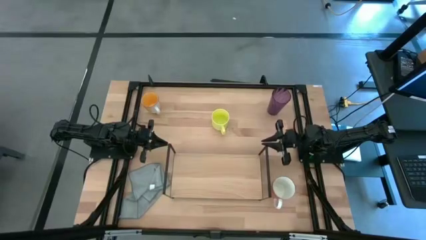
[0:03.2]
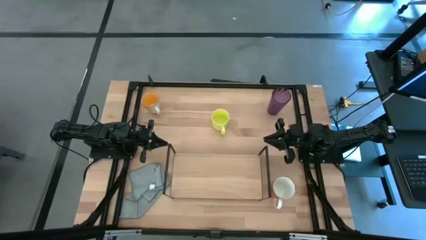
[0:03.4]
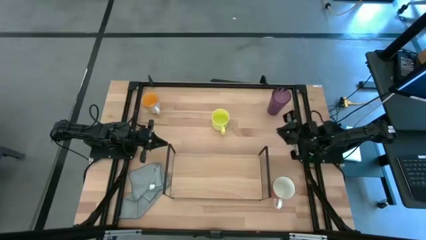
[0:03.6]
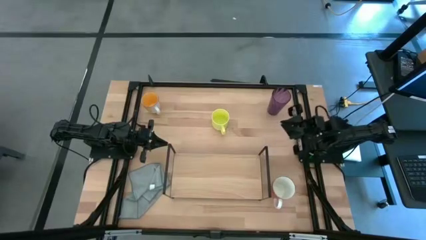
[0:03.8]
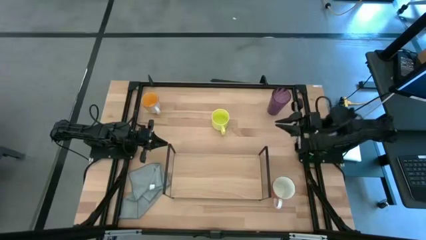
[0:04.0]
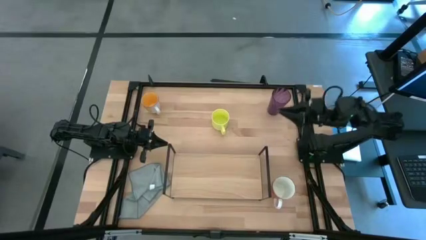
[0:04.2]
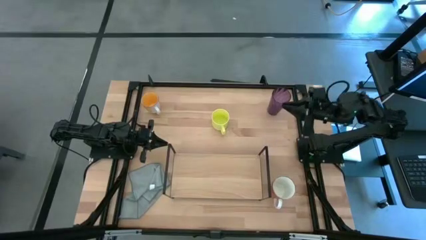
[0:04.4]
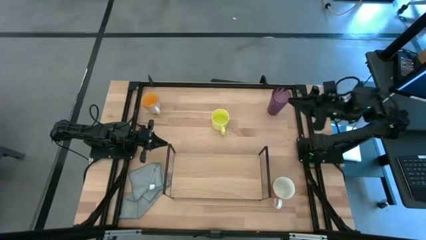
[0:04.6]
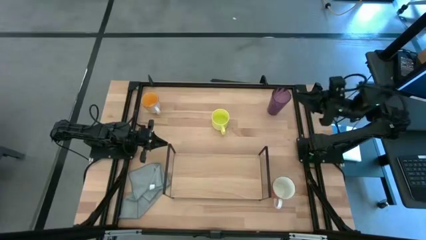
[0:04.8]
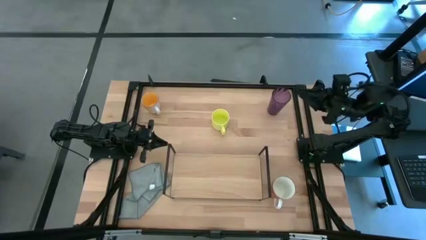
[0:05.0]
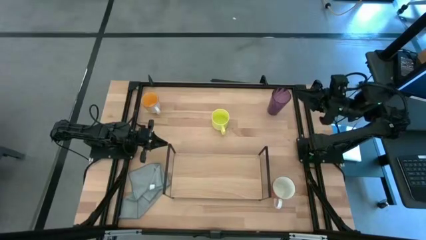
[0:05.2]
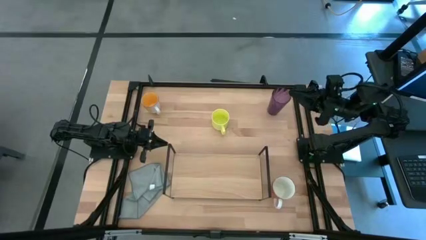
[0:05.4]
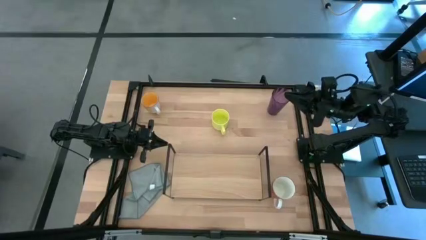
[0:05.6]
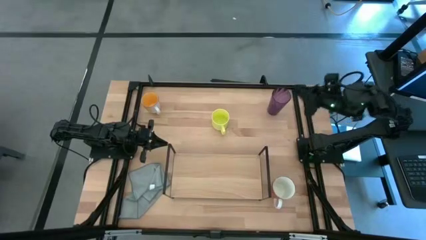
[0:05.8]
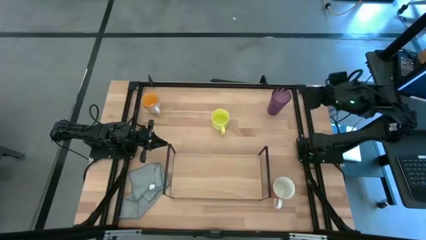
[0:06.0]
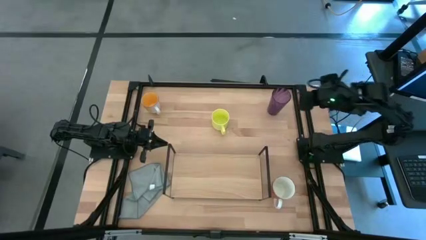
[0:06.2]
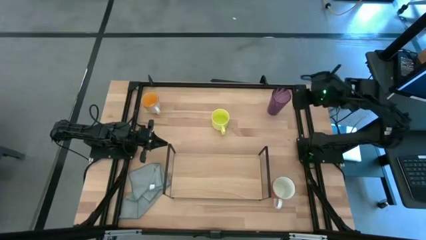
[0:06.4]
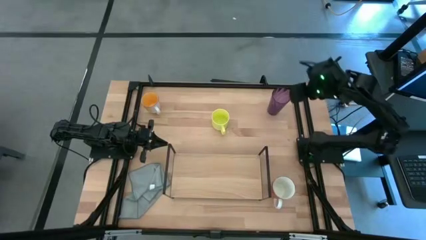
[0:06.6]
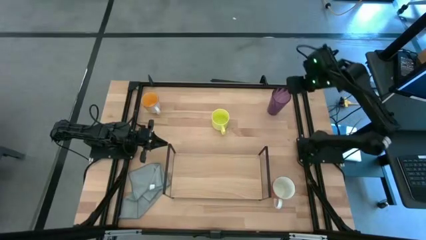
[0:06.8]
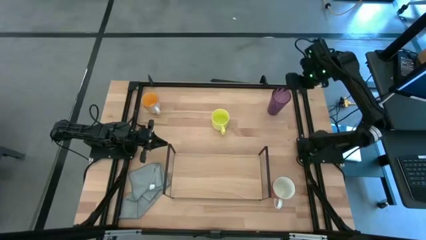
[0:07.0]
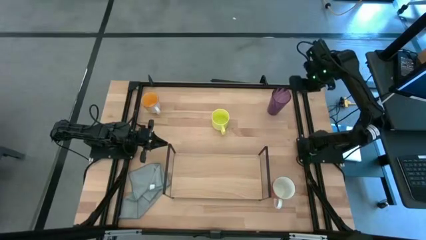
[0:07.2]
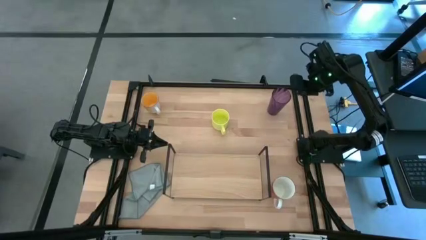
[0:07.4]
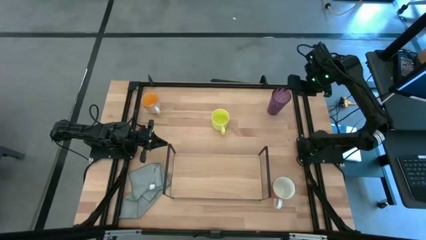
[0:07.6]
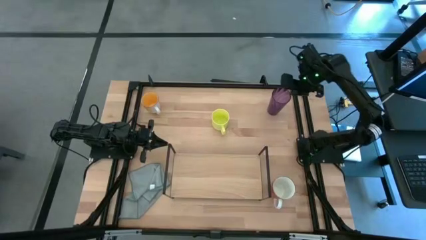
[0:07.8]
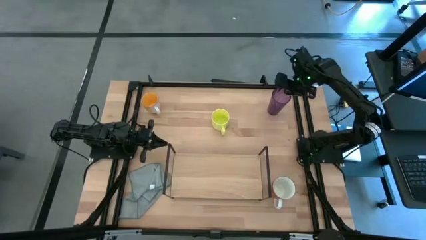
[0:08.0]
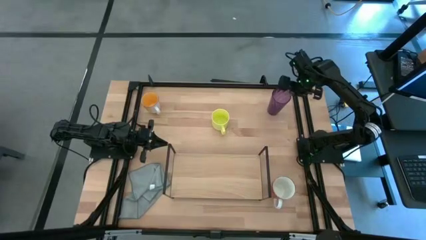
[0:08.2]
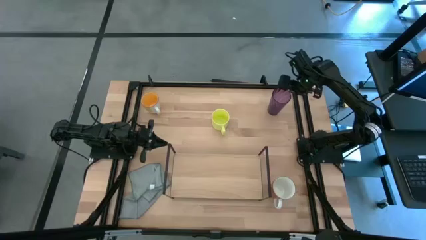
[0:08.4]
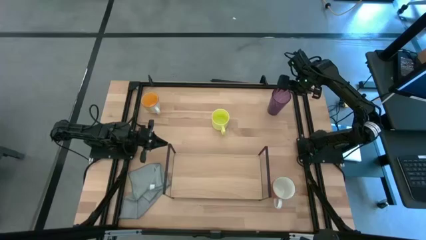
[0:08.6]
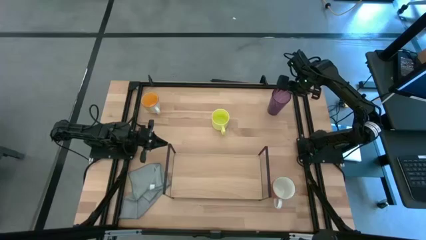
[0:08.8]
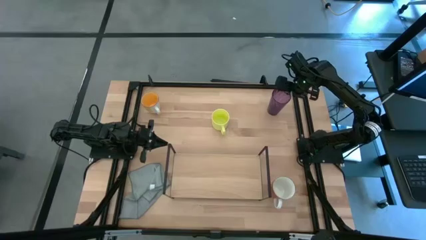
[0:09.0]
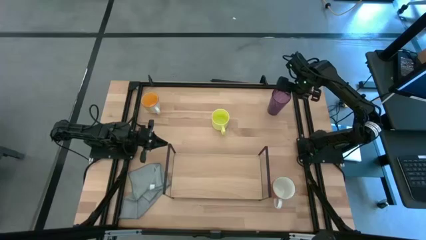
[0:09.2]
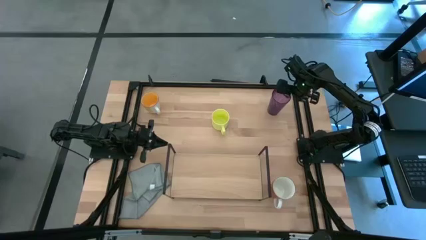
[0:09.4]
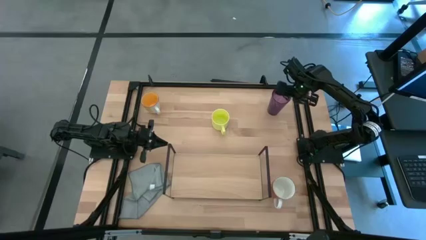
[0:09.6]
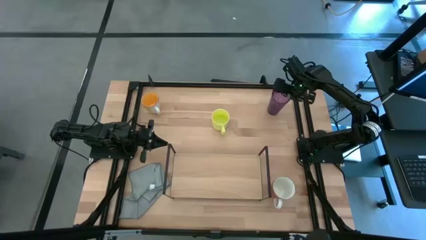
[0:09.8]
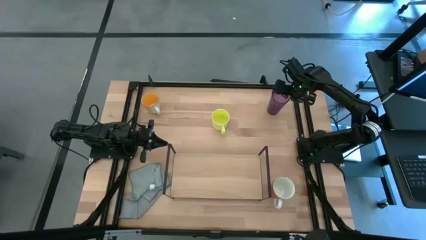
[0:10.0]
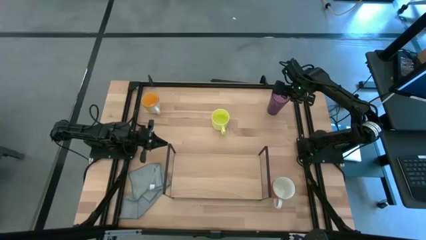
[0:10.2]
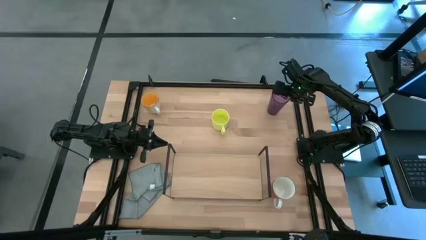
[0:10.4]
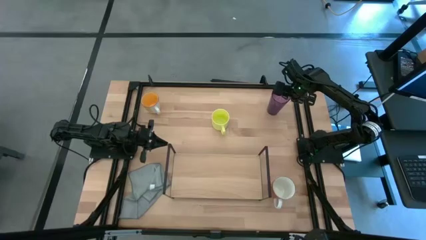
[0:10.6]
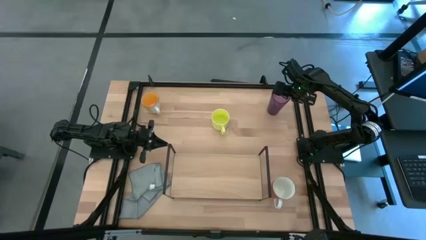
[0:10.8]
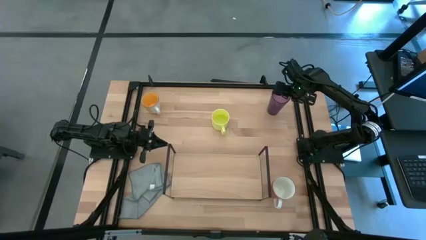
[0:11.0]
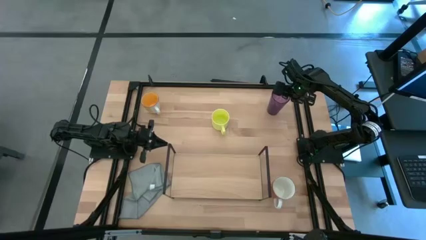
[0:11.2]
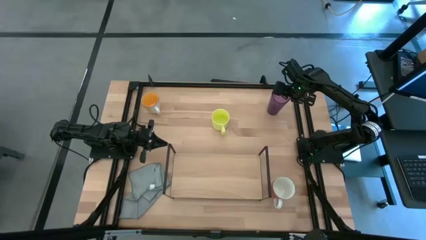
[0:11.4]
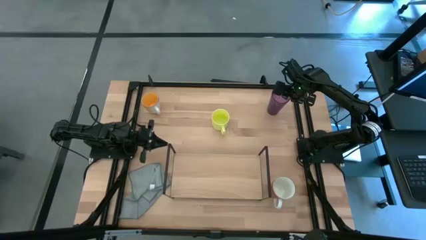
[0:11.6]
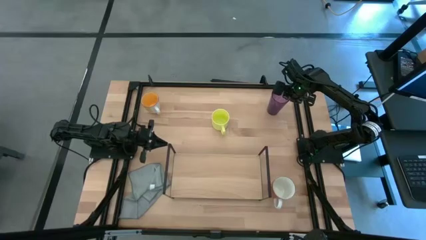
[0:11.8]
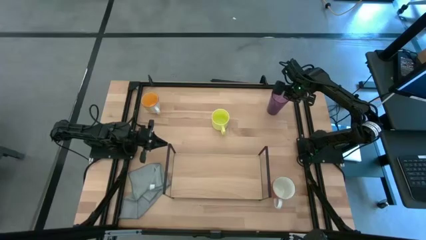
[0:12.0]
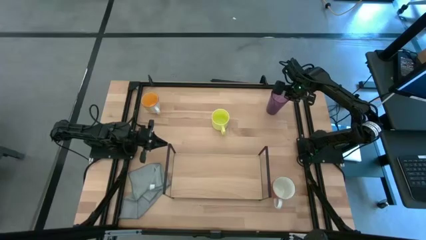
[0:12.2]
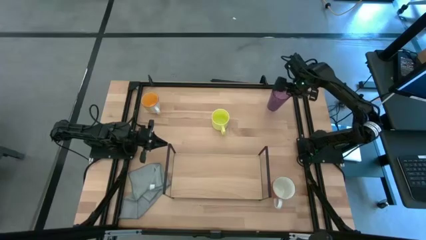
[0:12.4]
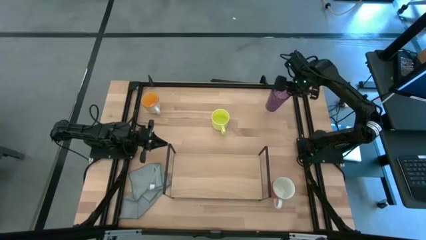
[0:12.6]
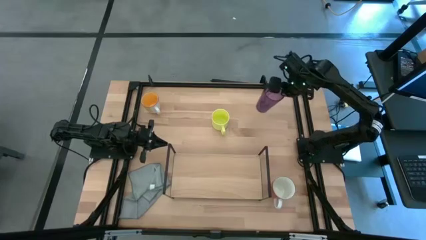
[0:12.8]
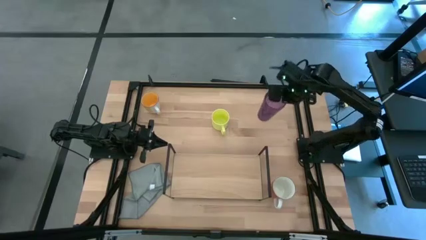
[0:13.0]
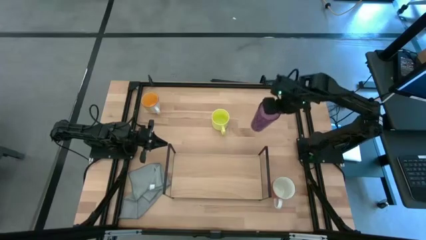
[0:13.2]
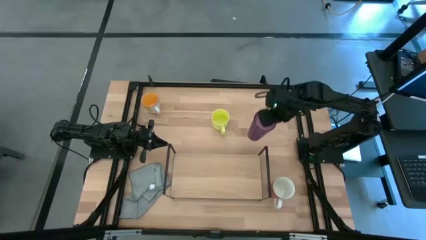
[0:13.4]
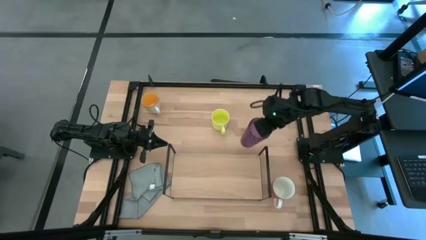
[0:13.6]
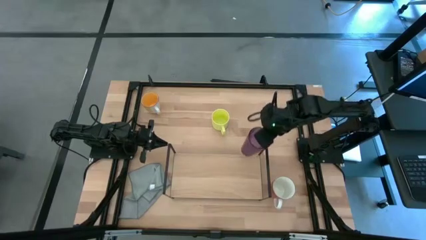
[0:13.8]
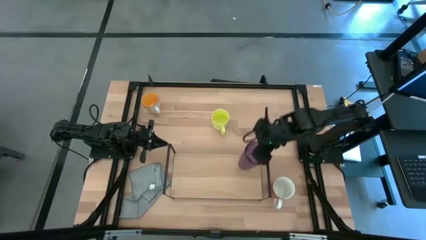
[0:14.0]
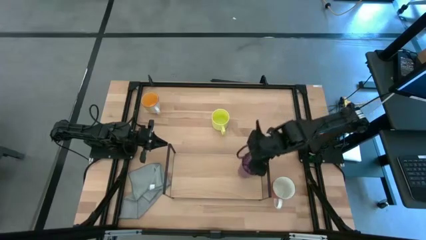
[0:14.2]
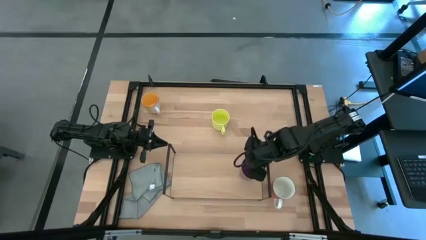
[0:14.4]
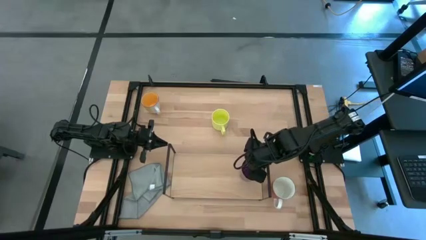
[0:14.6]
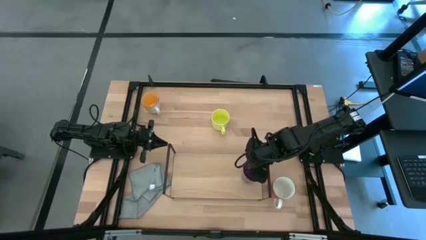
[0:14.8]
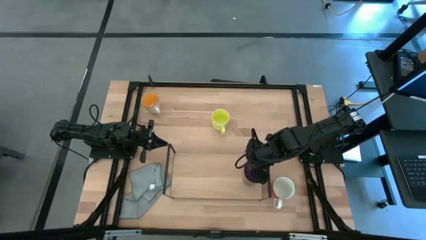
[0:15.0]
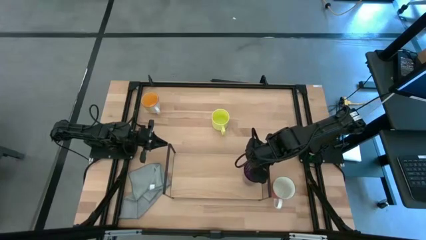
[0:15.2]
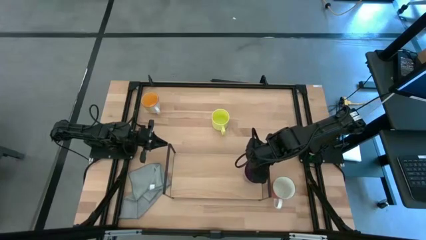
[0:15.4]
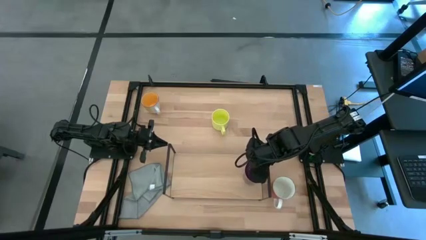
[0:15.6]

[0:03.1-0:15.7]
Task: Stack small to large cups/mugs on shelf
Put the violet cup on the shelf

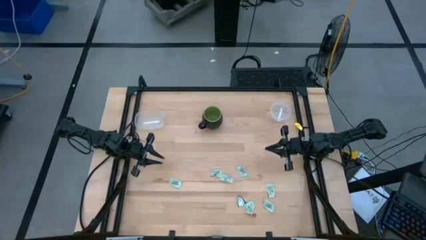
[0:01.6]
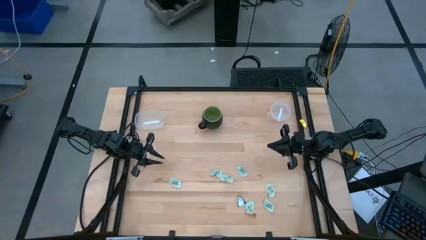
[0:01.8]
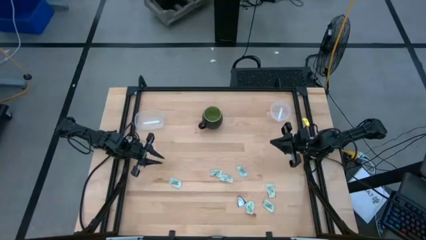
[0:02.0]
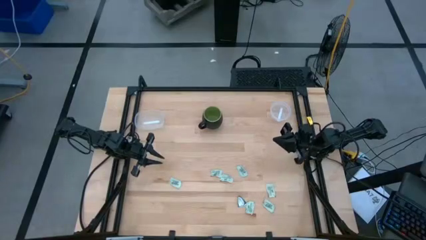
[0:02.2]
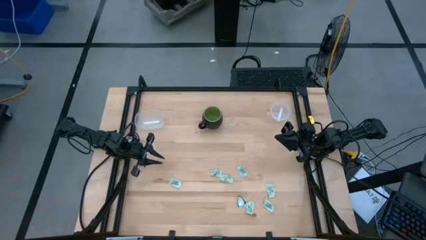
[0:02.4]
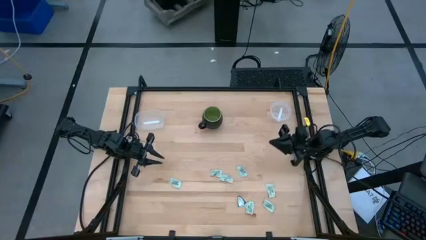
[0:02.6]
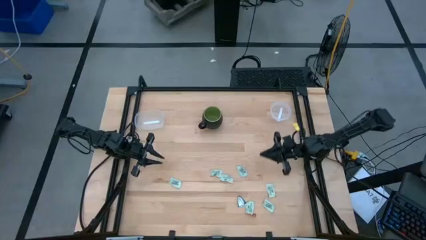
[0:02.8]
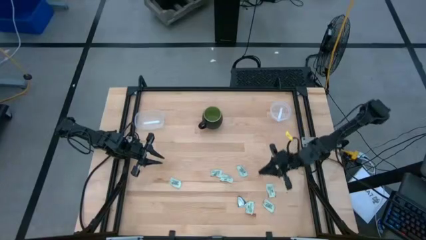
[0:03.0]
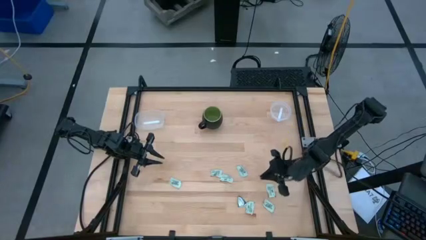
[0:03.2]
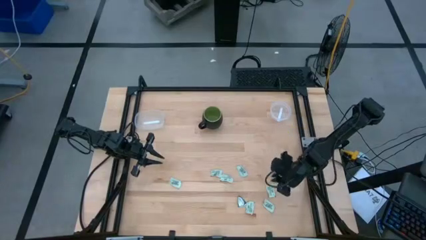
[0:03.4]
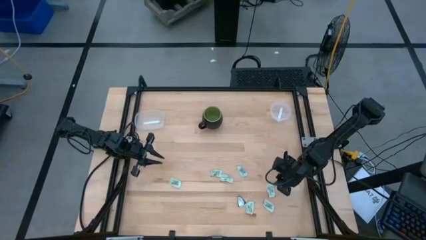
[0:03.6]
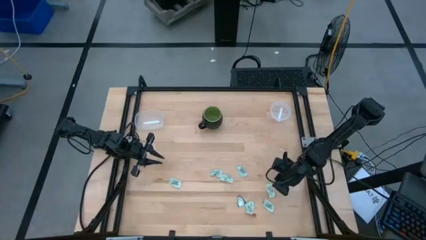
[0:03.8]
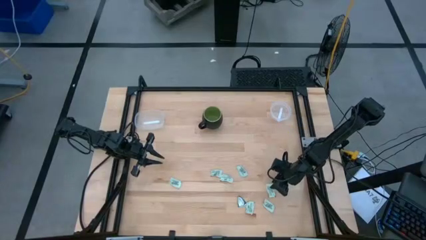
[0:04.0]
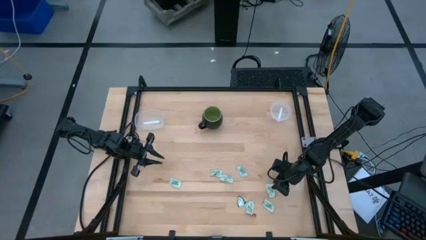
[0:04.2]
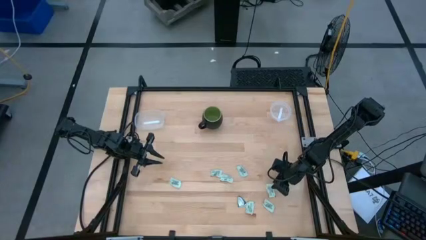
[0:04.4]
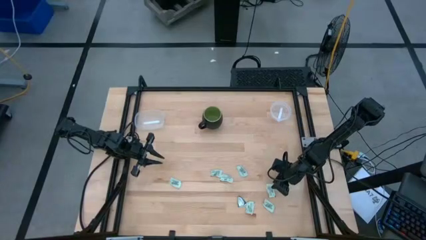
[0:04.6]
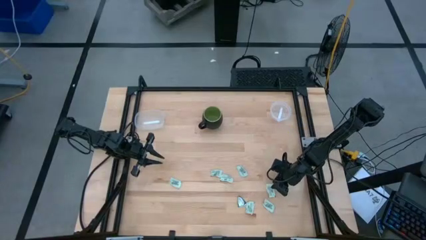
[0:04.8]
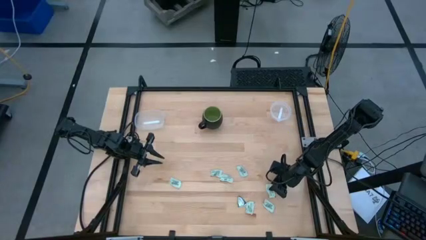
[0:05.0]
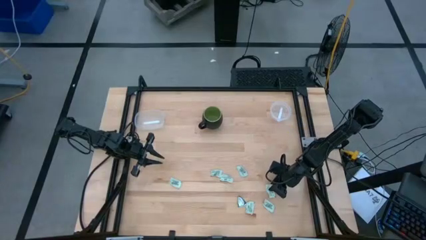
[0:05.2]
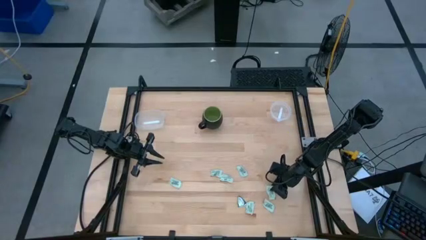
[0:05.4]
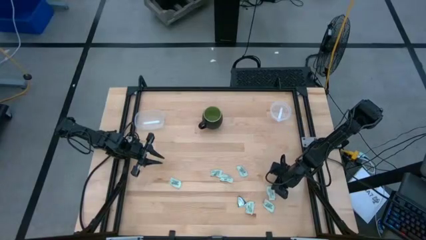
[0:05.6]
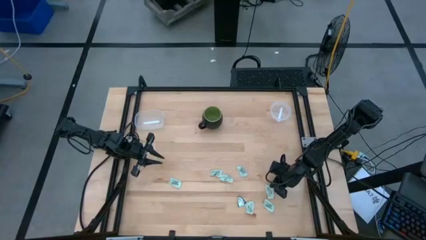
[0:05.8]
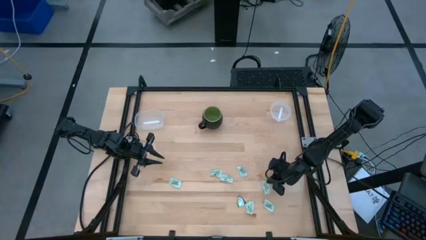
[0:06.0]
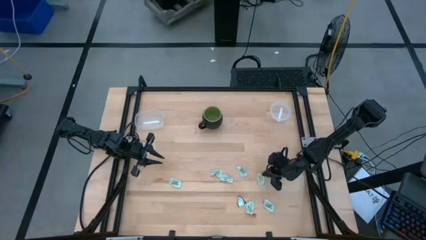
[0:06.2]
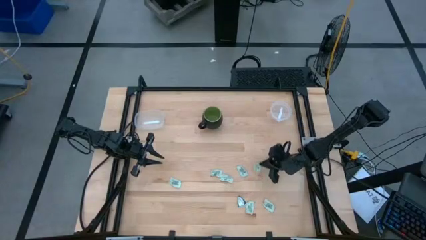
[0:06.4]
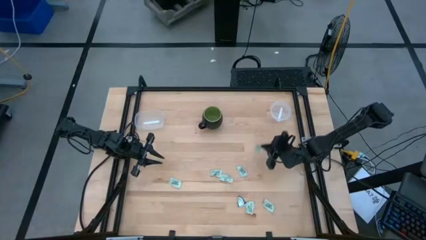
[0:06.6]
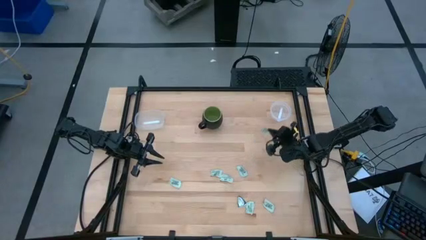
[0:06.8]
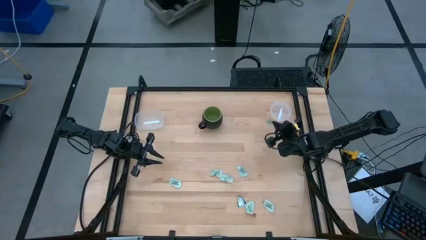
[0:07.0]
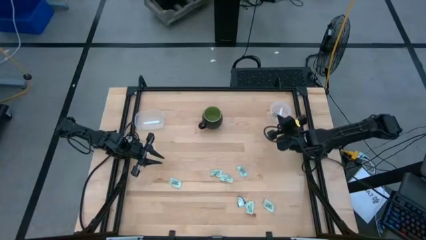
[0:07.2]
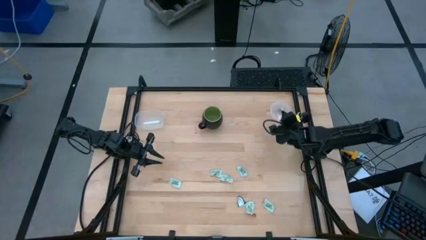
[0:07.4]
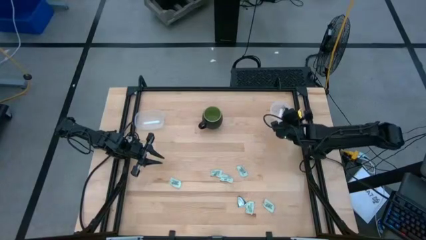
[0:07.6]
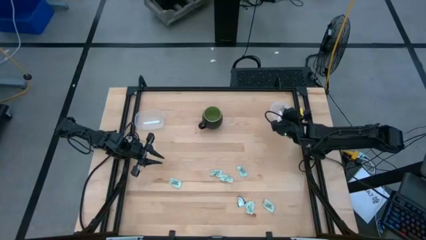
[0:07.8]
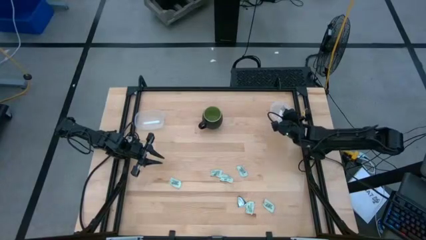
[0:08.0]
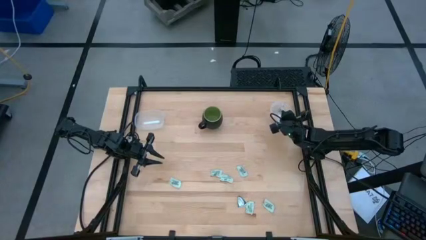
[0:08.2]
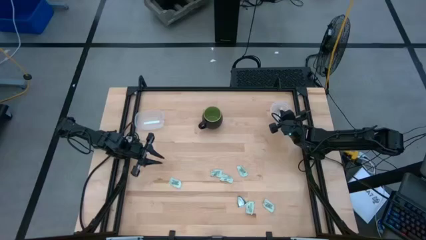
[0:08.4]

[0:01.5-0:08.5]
Task: Pick and place items into bin
Put the white stevia packet into the right transparent bin
